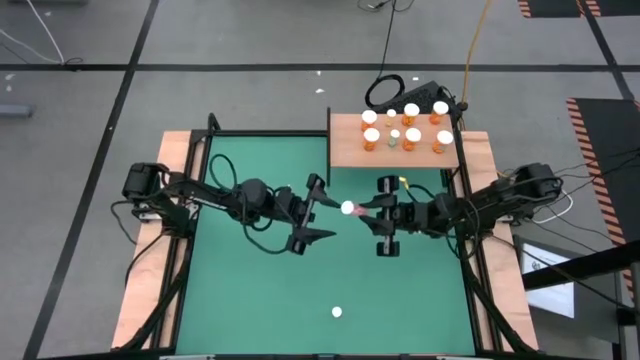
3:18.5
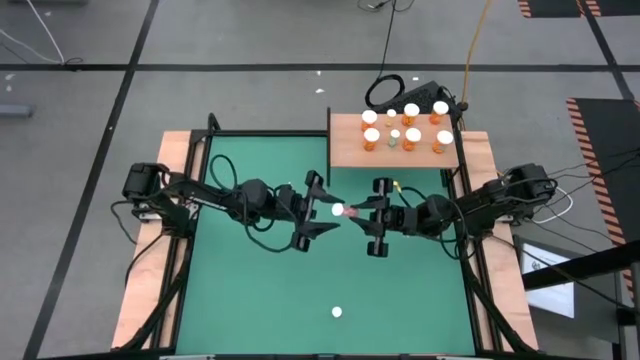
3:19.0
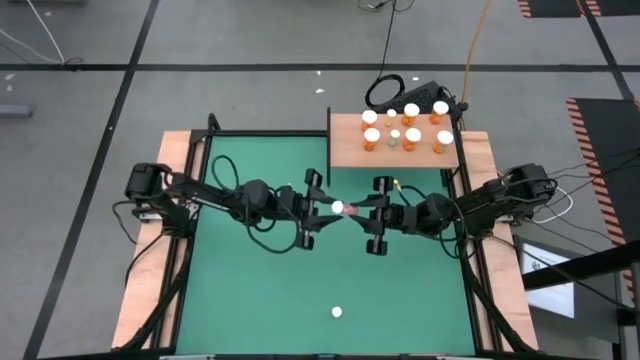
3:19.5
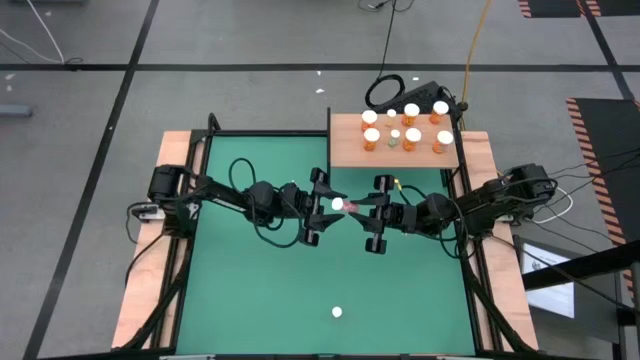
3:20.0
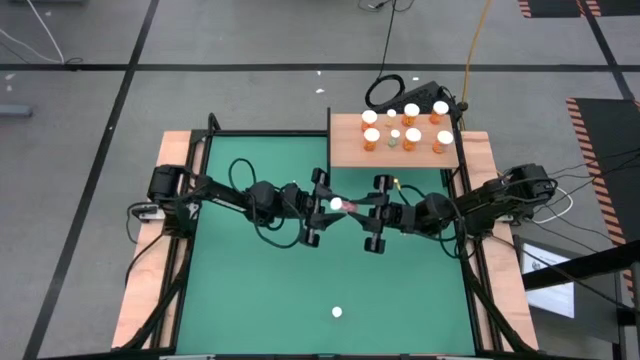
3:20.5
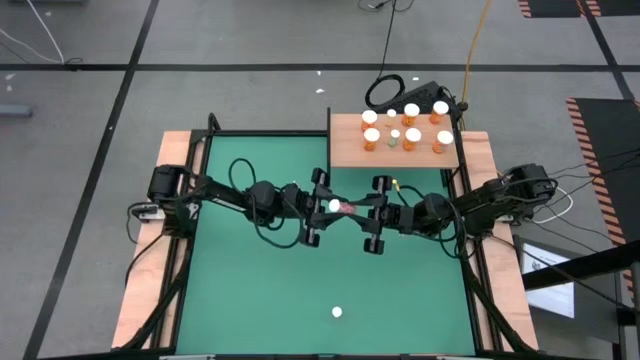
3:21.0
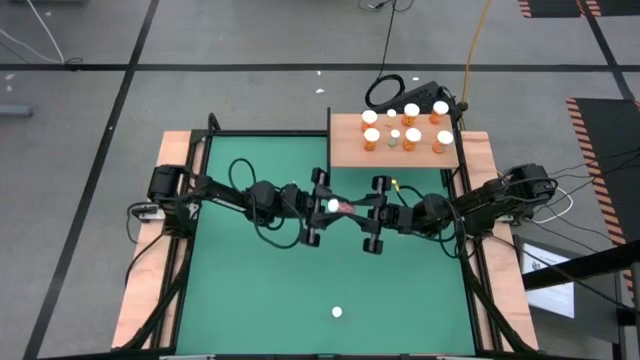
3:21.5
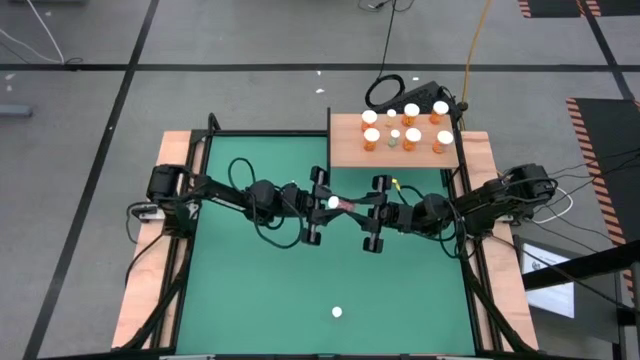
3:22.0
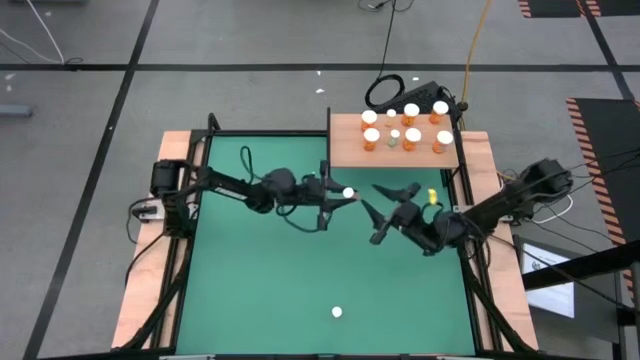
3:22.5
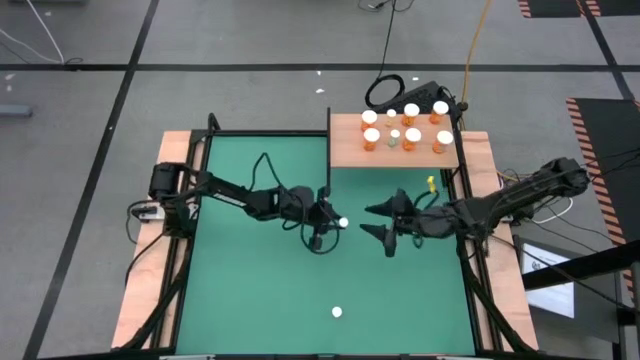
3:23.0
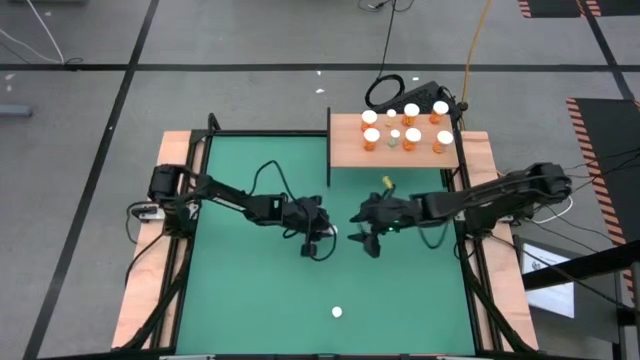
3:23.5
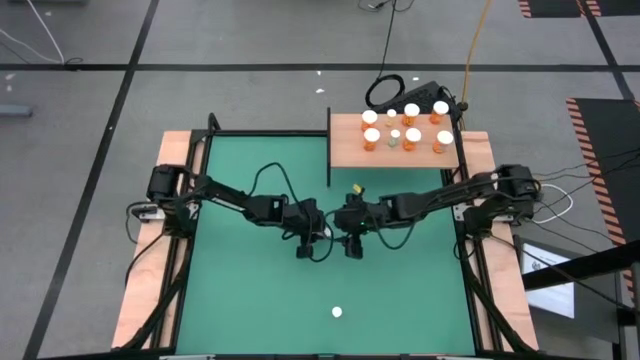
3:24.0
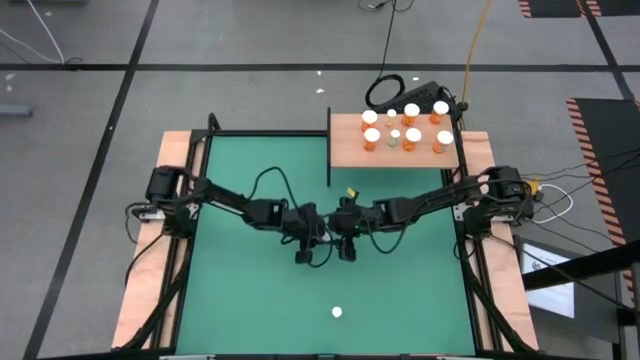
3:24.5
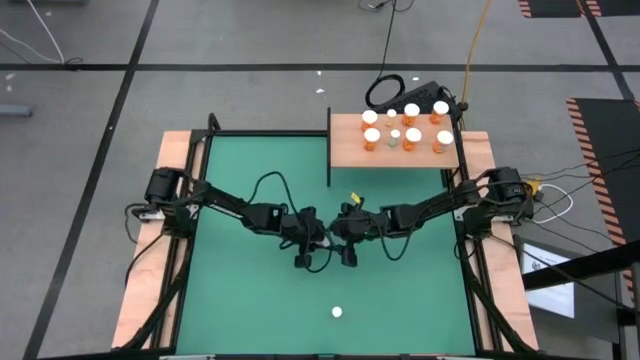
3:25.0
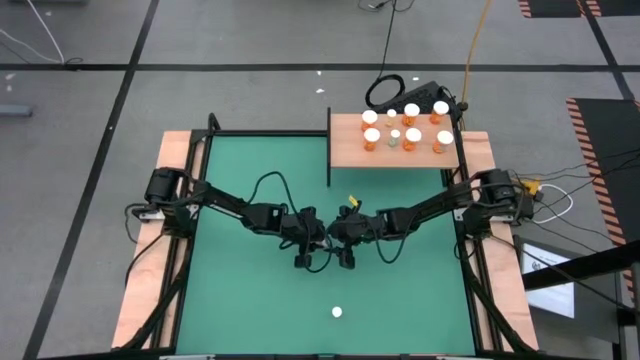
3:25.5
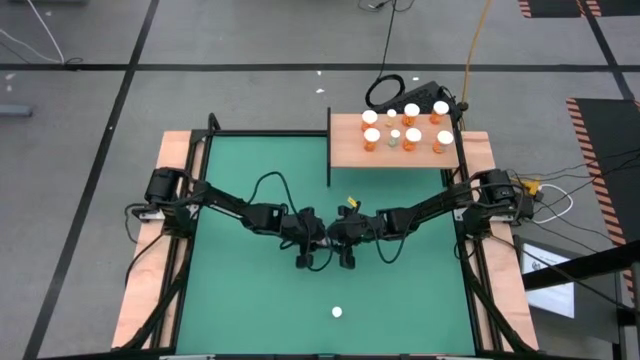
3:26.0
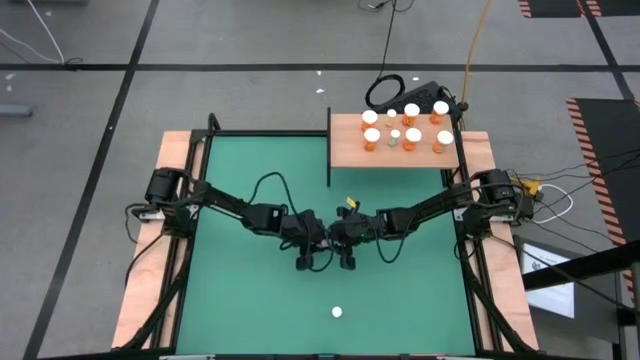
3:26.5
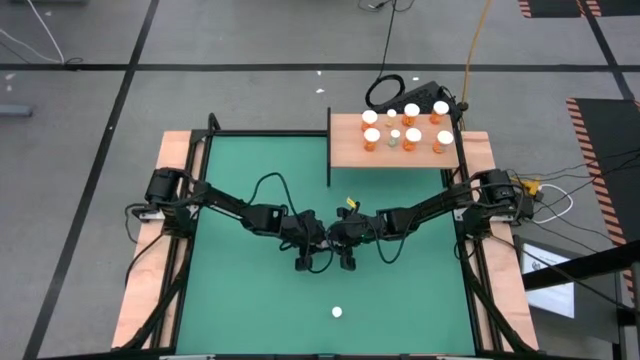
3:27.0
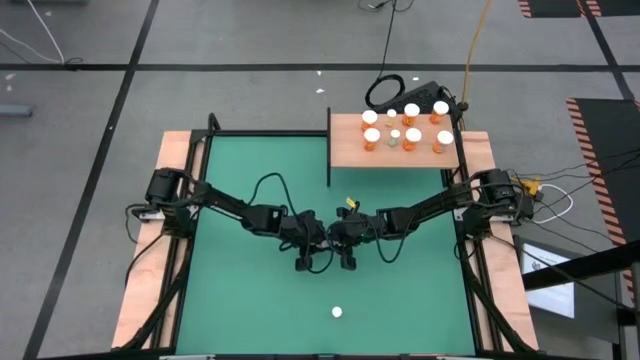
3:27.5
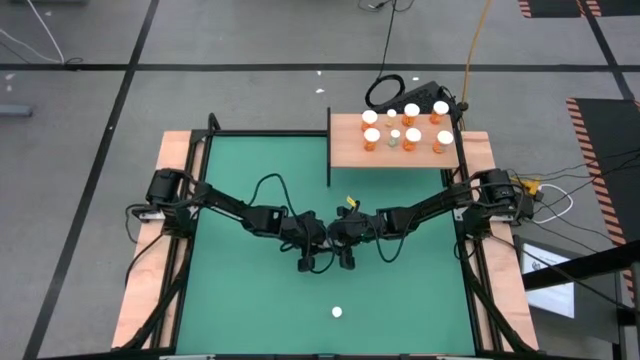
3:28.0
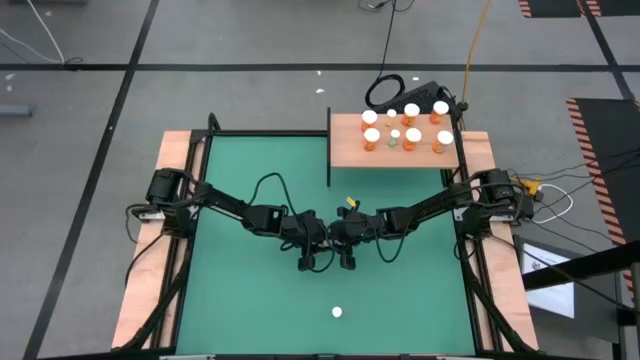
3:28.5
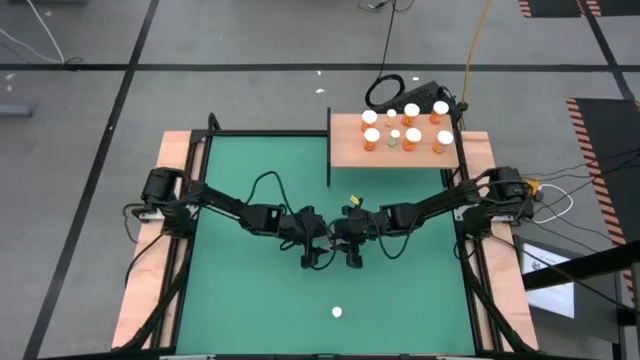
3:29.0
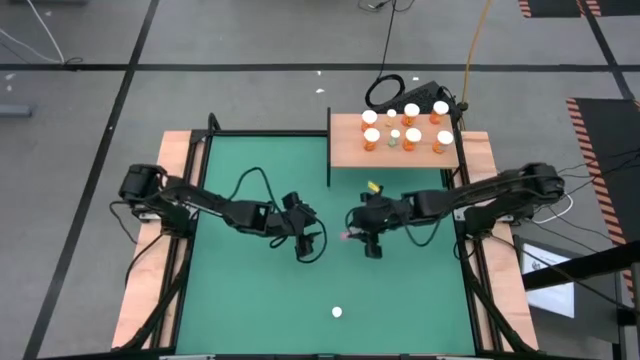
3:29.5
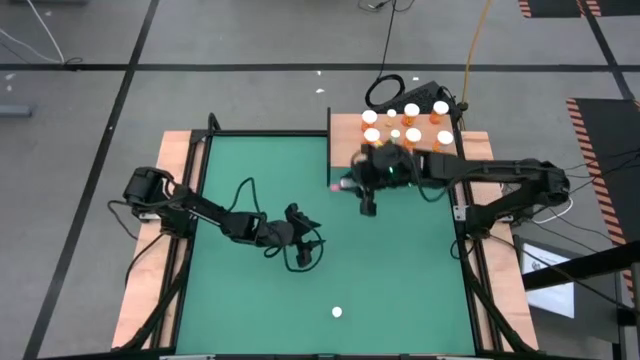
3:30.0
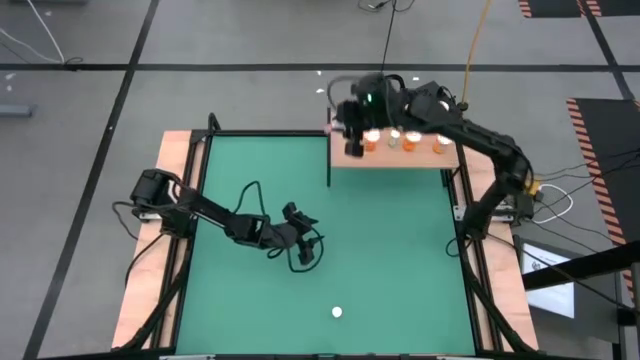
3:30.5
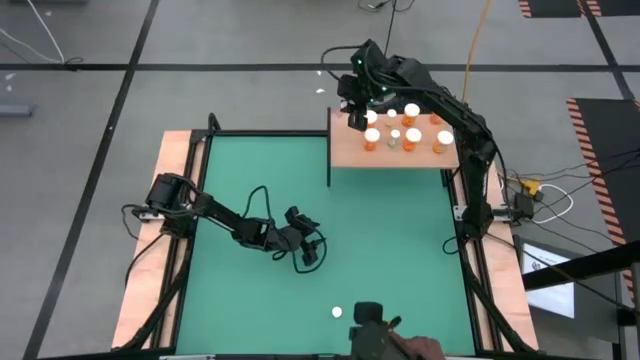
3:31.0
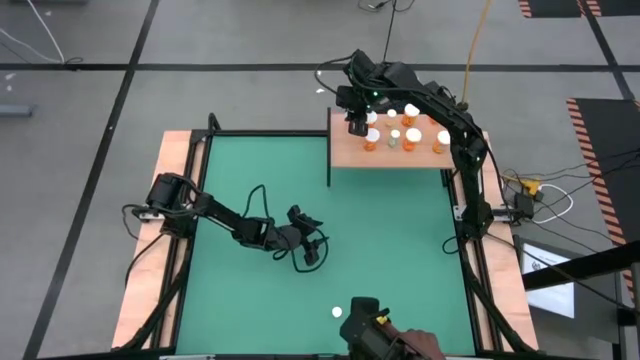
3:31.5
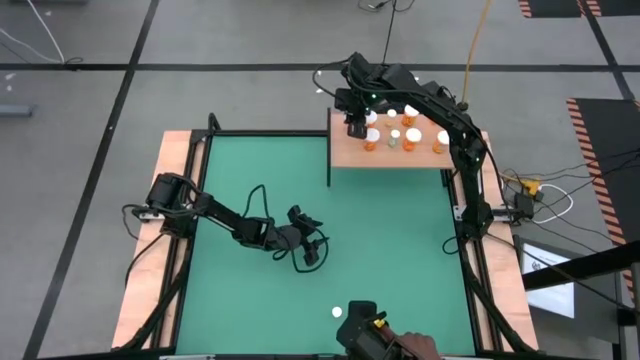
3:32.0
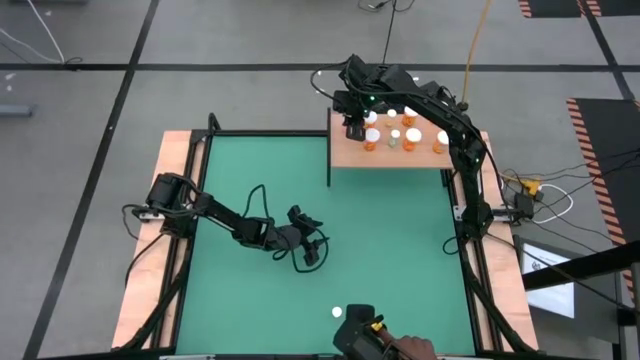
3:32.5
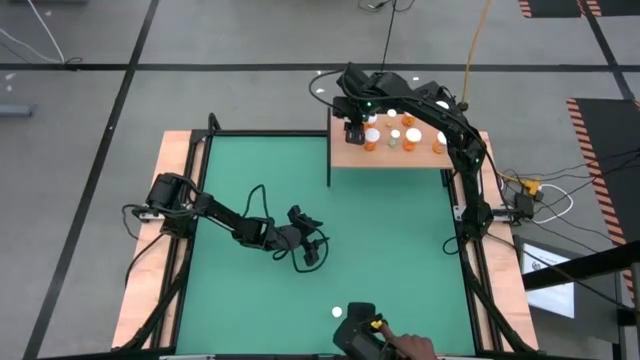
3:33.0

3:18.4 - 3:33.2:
Task: Pick and place medicine bottles onto shelf by color
Put the pink pill bottle on the shelf

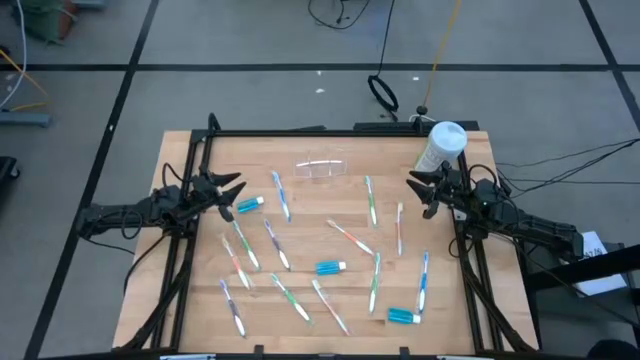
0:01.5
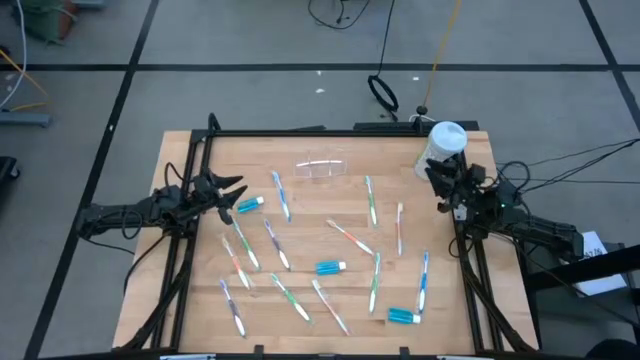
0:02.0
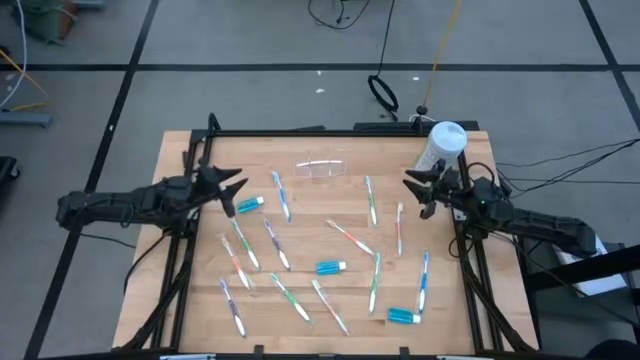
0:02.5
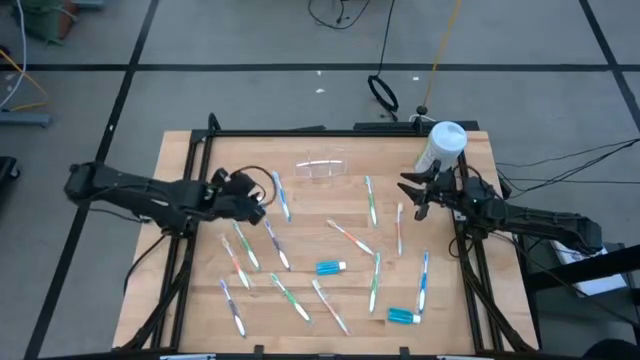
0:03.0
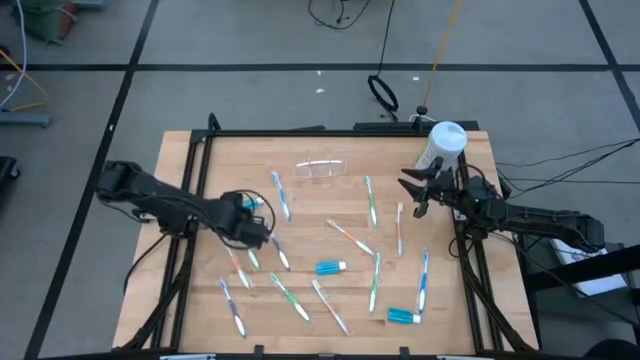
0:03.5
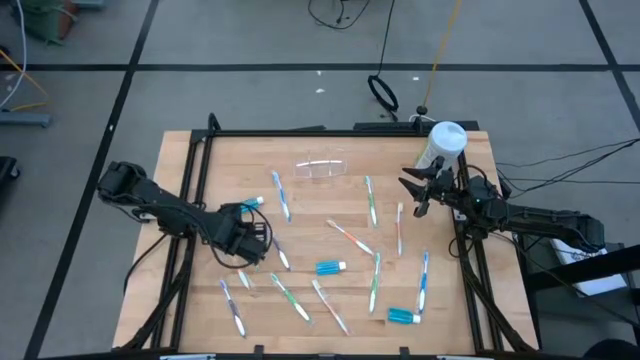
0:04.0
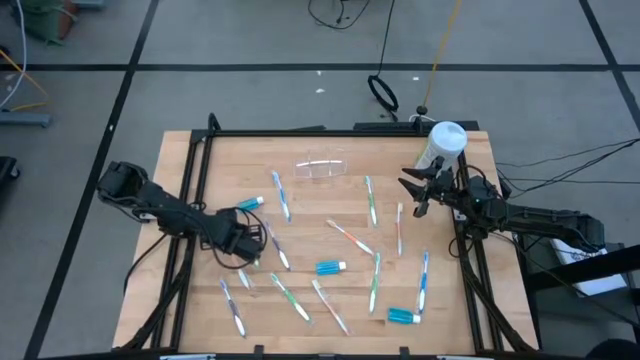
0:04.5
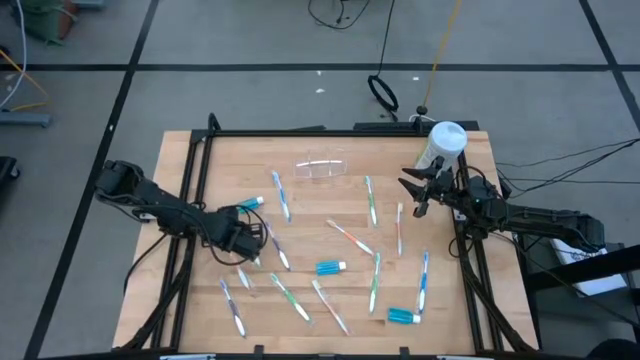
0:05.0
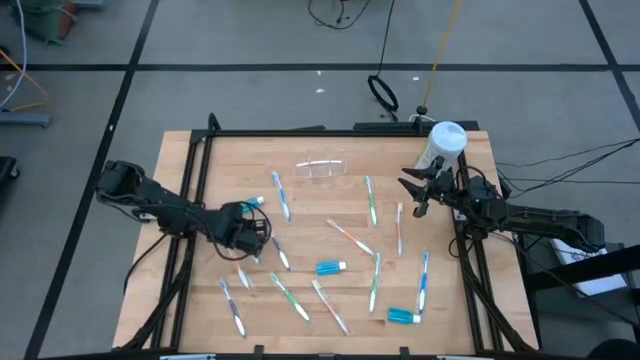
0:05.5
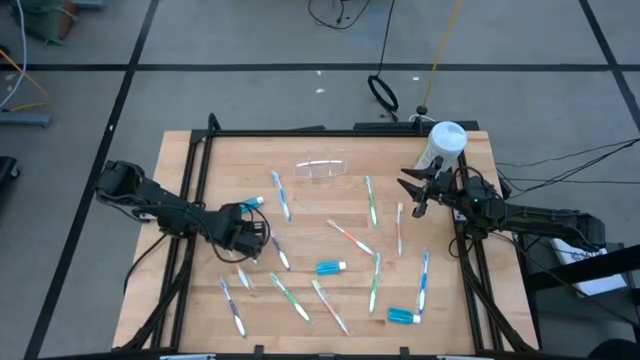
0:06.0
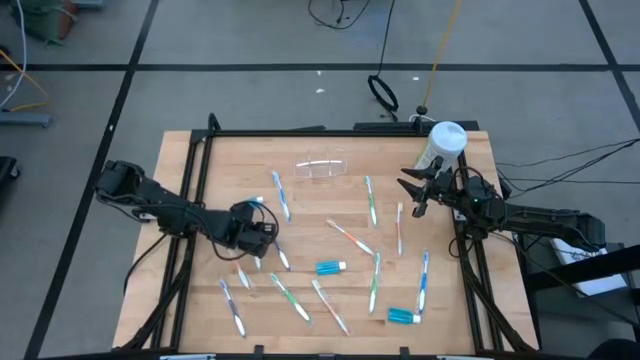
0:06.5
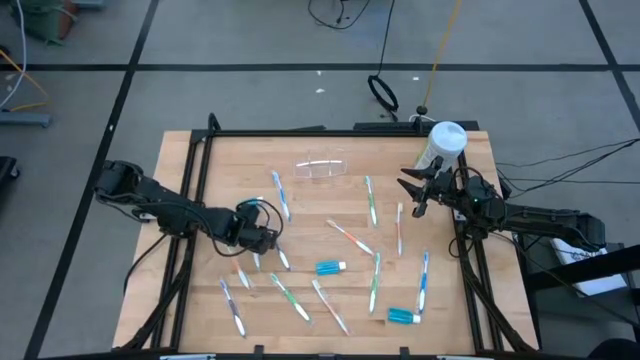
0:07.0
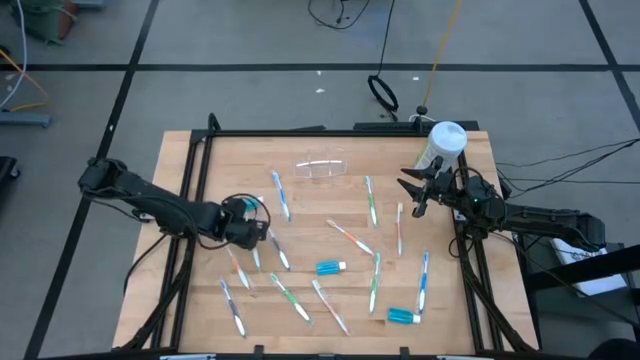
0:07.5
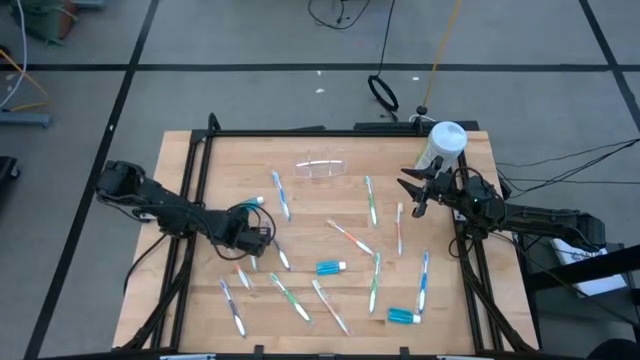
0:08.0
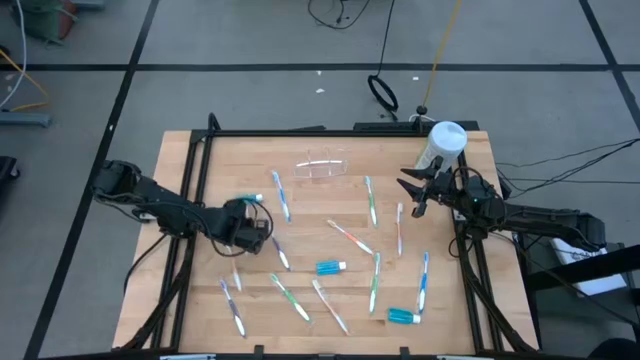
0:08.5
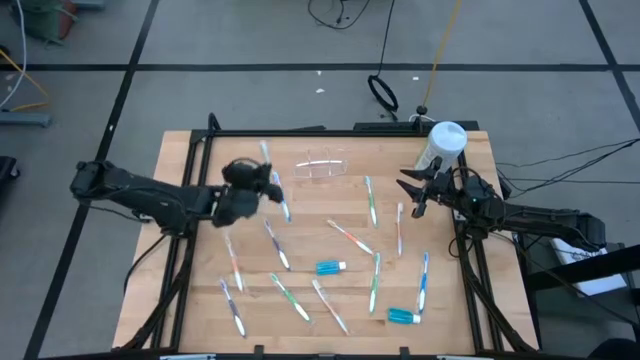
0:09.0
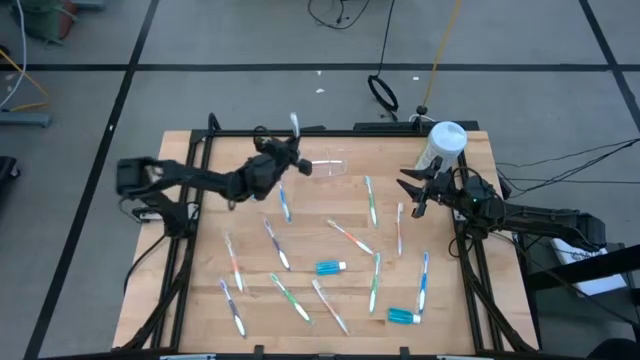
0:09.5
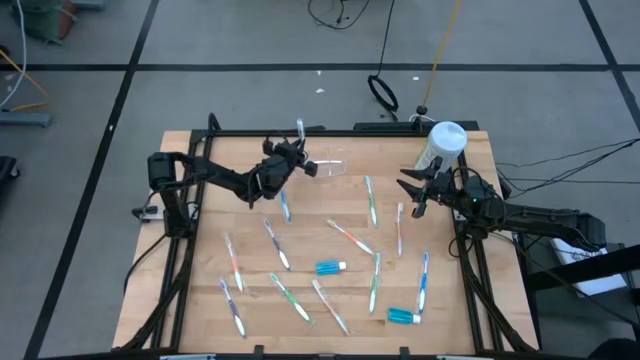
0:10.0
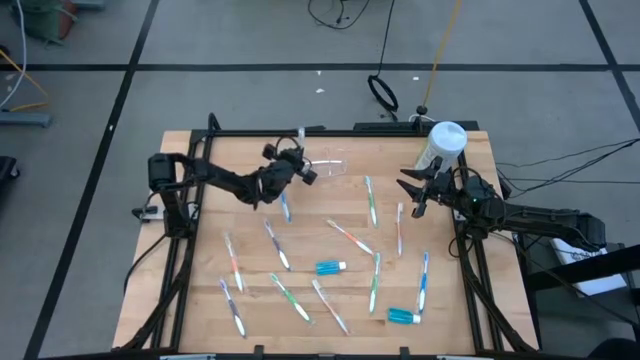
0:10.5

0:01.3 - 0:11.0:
Task: Pick & Place Toothbrushes
Put the green toothbrush into the transparent organizer
